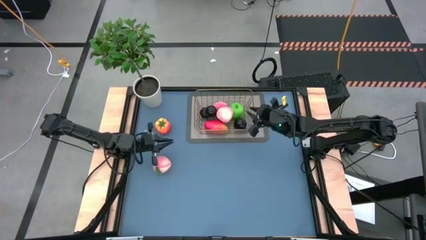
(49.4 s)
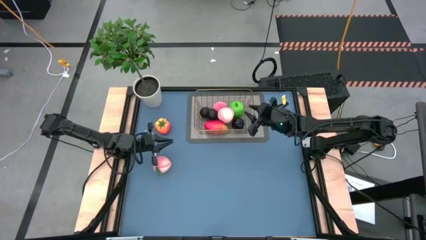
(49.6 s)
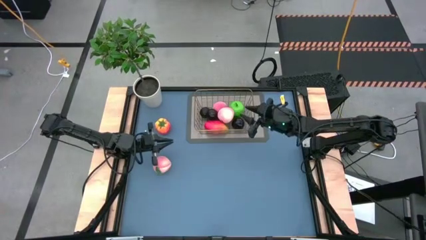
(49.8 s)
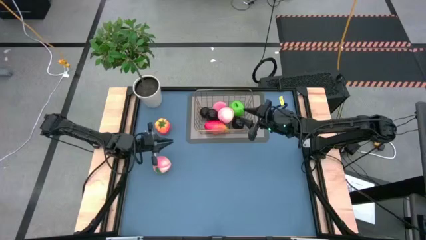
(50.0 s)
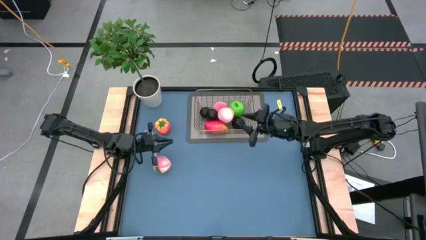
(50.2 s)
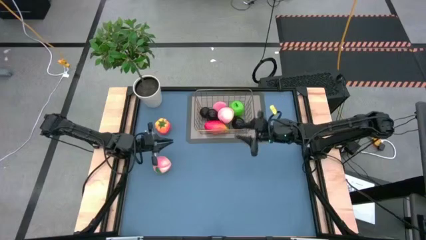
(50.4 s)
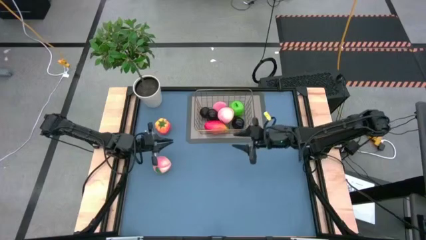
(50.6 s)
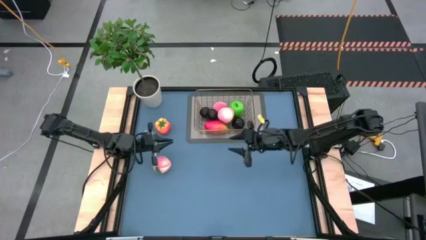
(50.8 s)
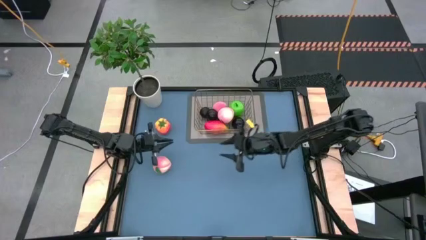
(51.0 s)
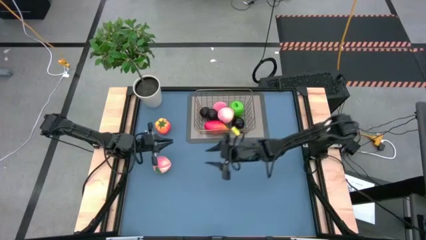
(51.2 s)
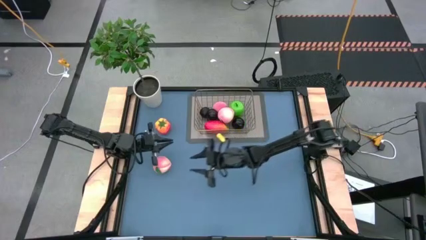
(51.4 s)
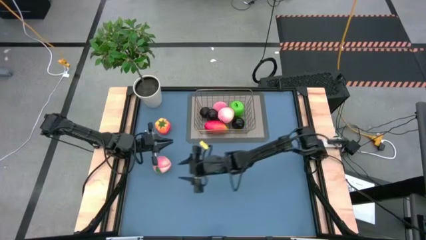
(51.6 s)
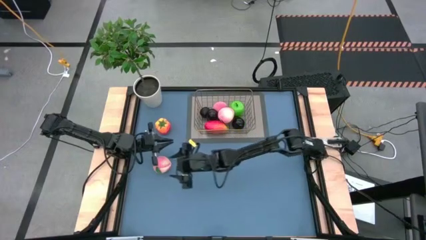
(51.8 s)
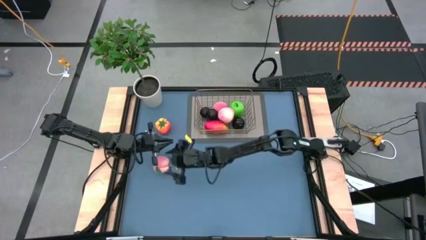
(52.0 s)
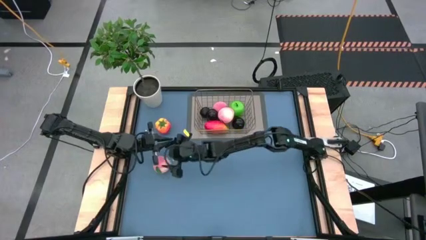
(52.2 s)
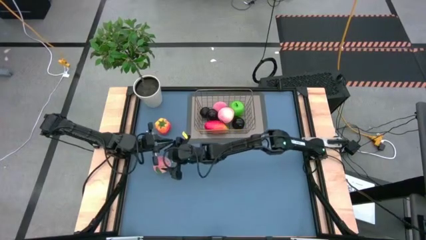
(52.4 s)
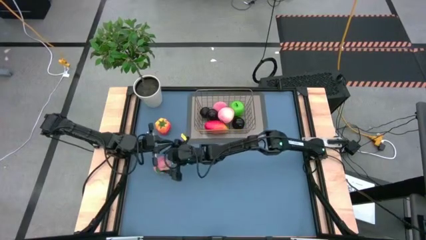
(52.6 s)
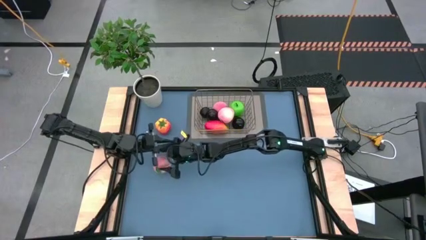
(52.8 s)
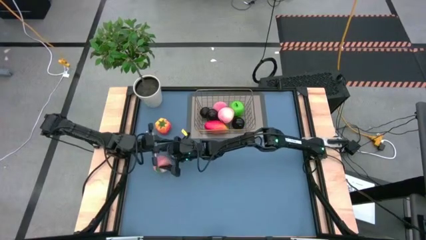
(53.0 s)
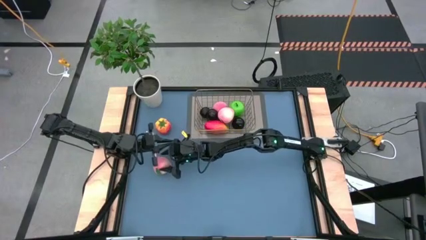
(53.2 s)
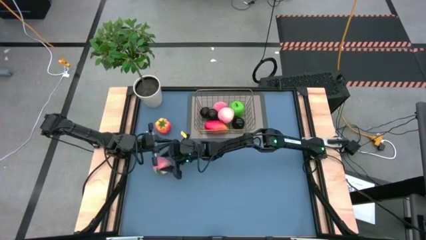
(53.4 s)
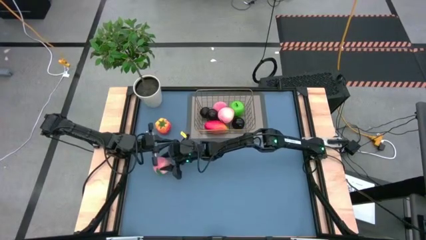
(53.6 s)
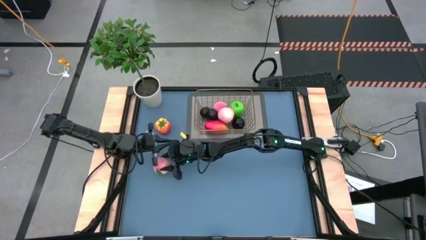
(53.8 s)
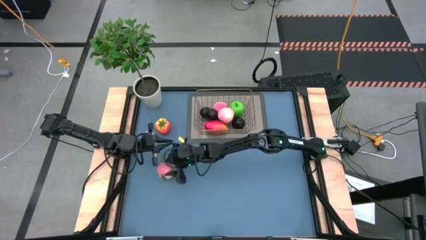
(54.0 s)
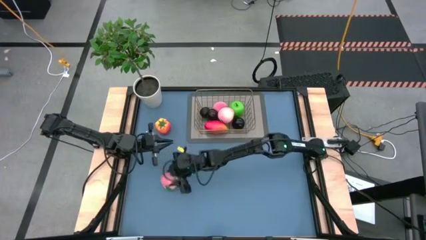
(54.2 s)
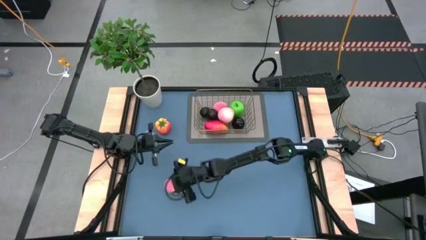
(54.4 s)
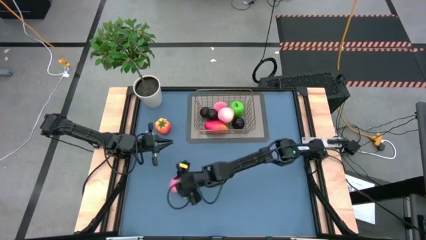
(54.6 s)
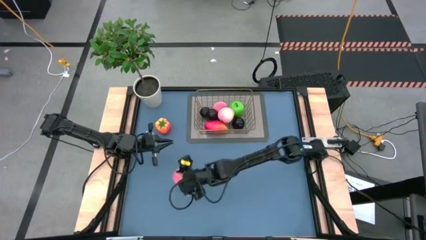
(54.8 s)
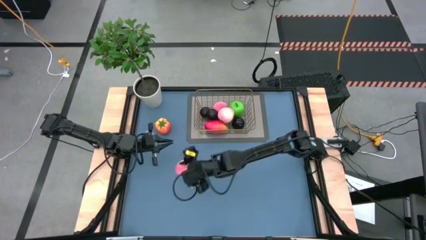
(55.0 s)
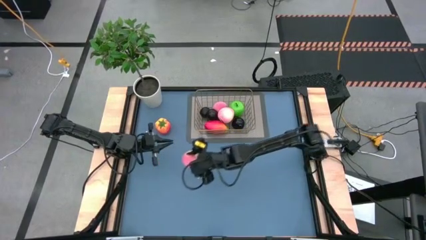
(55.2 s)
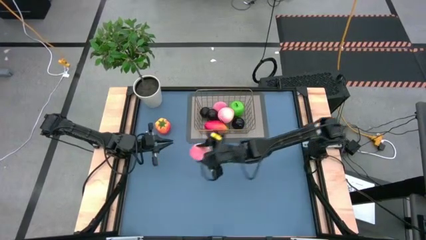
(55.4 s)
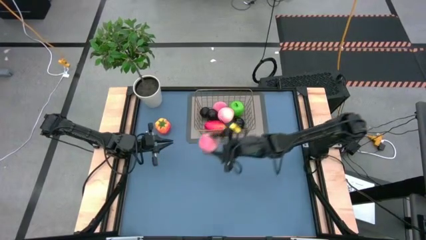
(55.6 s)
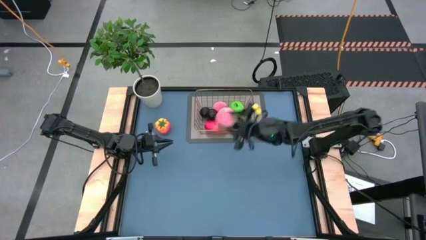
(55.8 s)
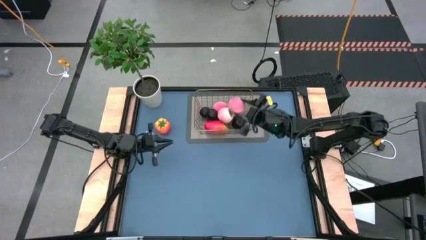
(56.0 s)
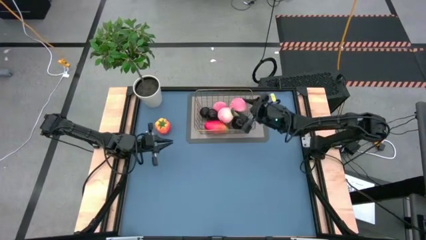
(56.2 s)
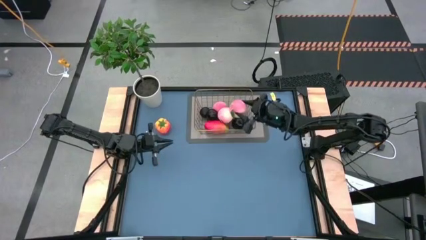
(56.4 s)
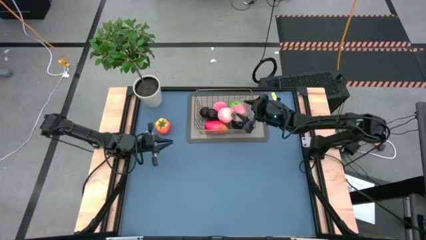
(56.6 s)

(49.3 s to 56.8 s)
Task: Build produce basket
Put the pink peach into the wire basket

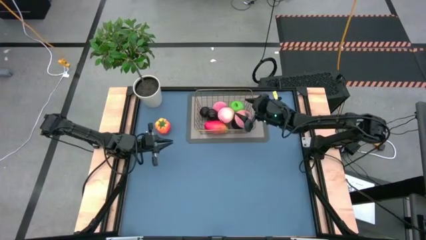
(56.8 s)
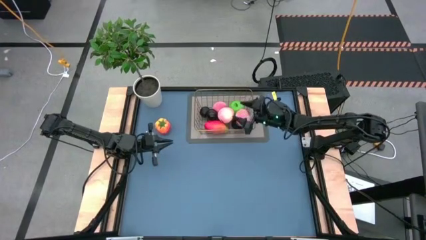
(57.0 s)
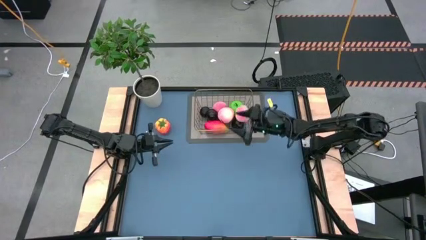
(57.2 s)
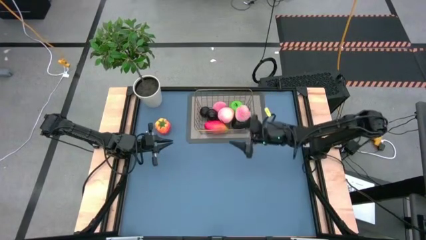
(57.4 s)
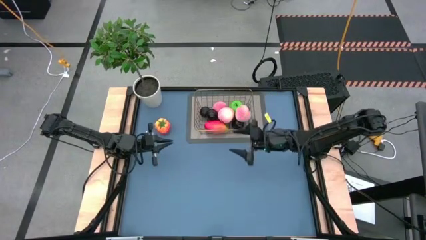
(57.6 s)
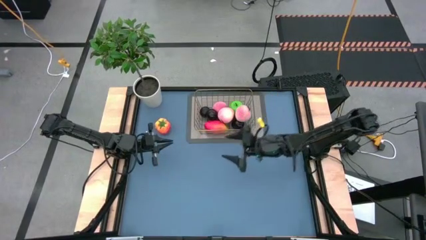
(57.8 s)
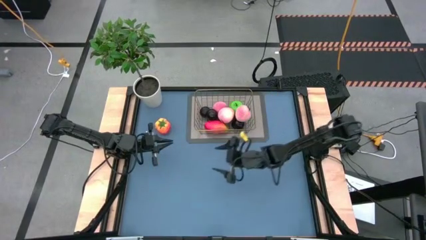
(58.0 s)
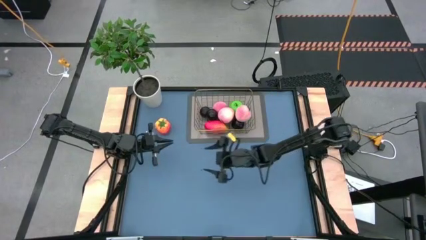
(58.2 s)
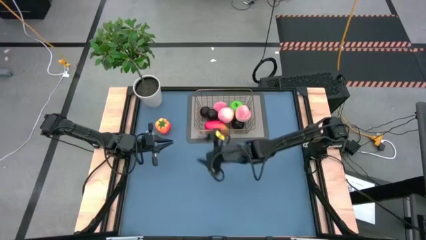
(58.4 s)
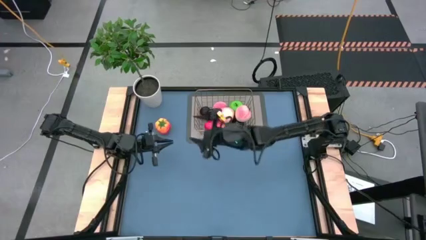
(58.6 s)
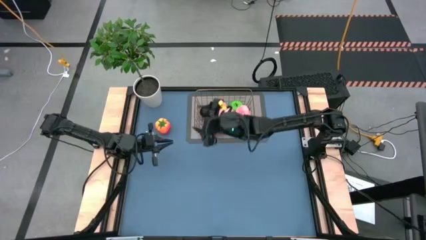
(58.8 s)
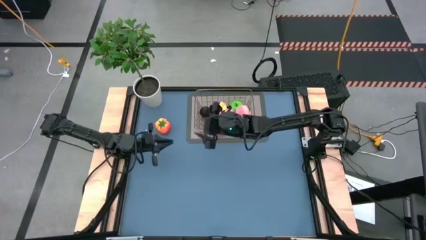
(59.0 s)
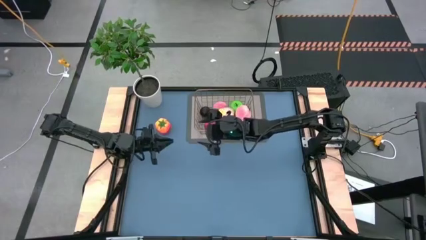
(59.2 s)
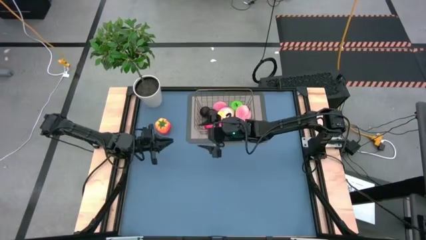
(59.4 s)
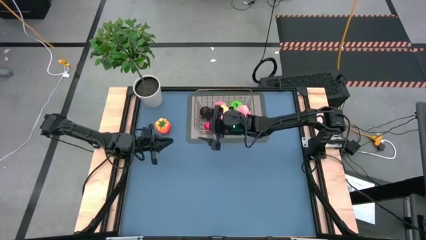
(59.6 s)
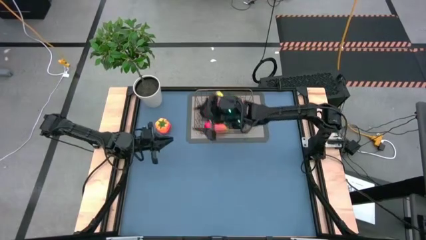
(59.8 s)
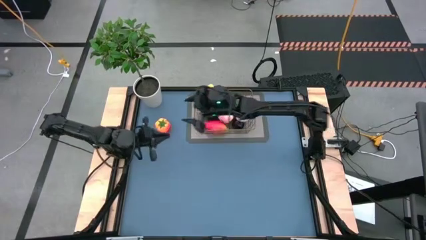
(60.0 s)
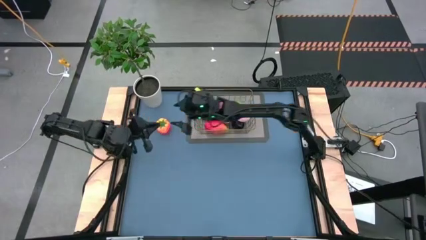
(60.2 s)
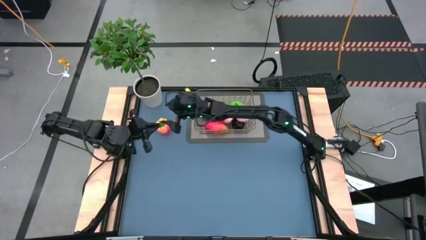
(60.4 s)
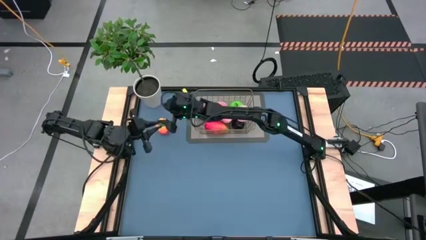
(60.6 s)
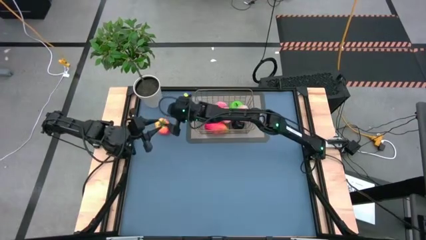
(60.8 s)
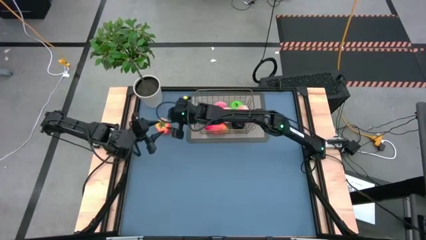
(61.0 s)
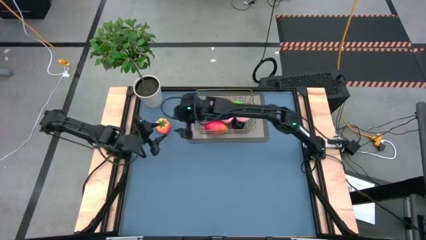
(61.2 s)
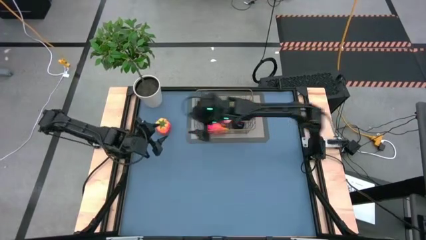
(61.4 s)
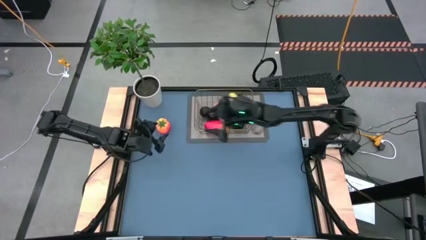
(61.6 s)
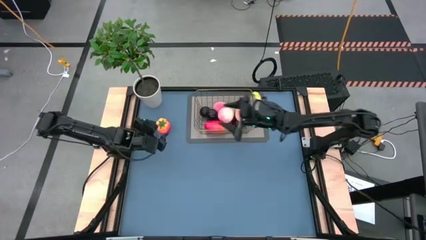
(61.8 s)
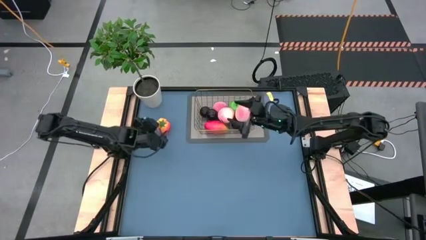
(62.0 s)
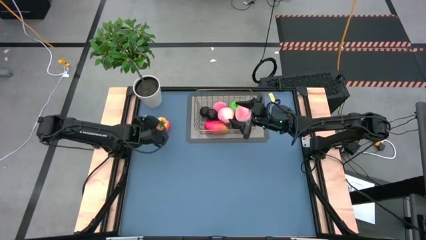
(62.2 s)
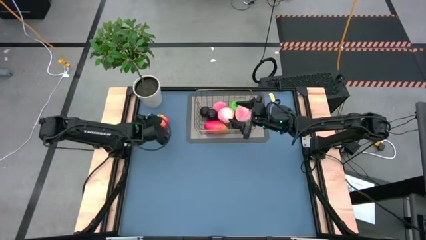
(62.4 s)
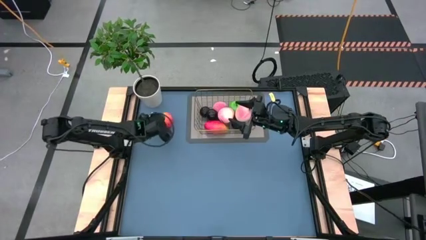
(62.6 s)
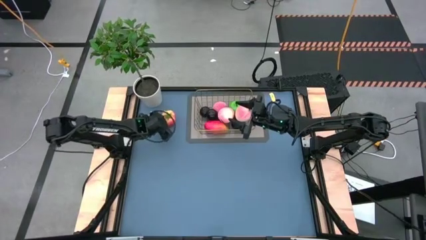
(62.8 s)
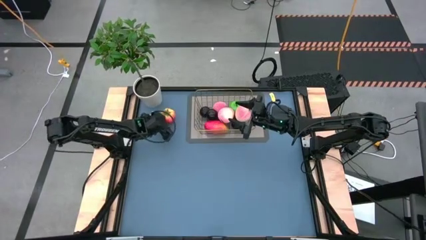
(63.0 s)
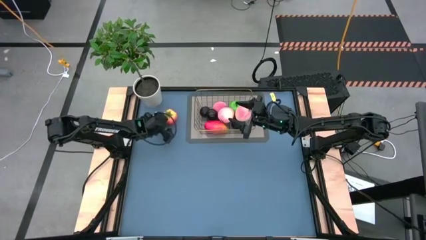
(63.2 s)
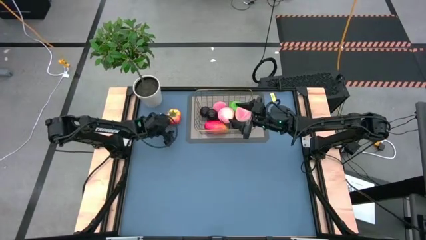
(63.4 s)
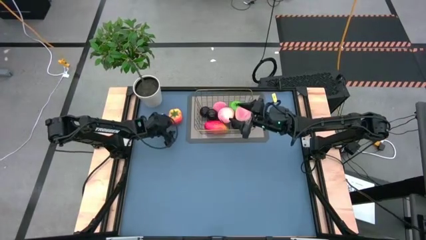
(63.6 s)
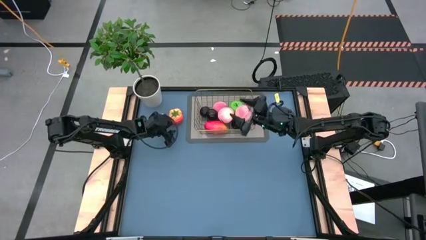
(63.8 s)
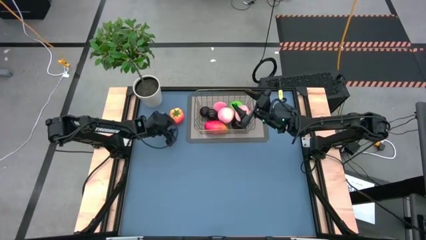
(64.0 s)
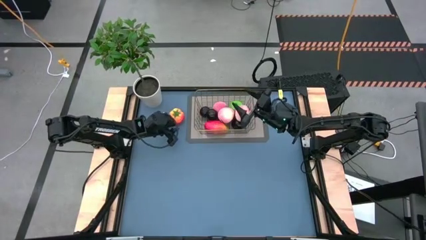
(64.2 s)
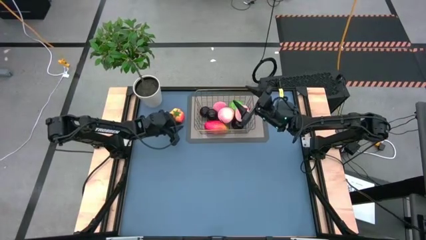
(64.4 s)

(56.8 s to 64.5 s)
Put the orange tomato into the wire basket
